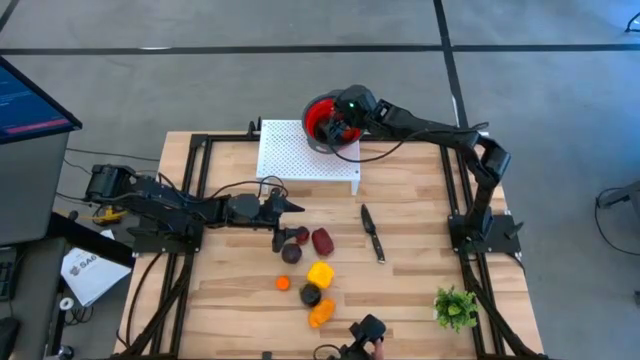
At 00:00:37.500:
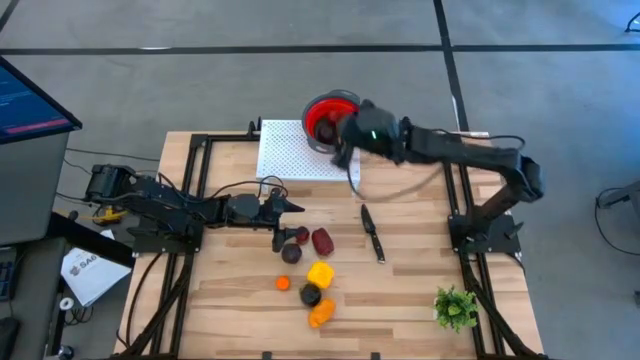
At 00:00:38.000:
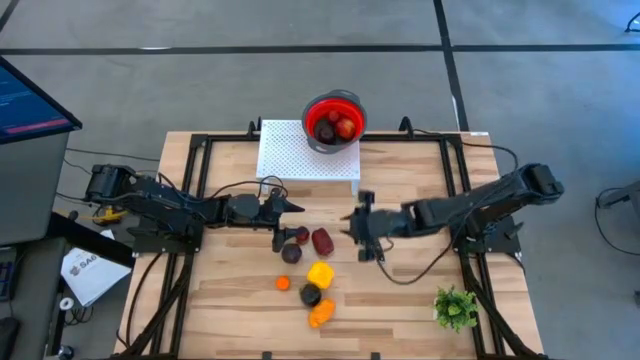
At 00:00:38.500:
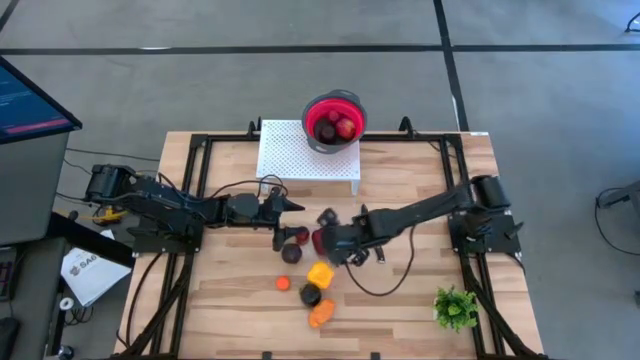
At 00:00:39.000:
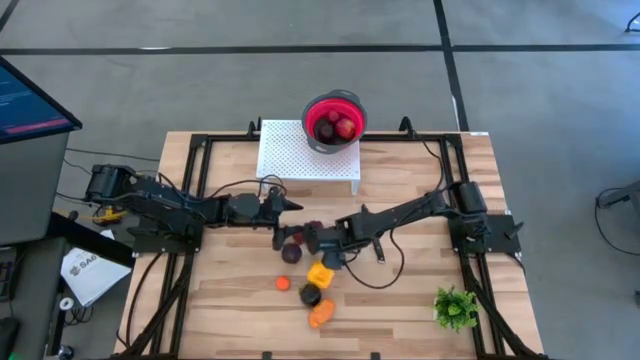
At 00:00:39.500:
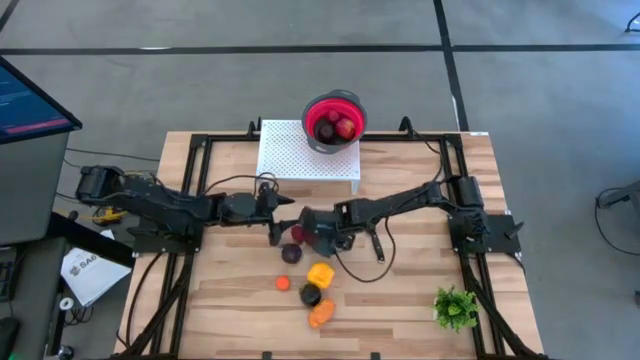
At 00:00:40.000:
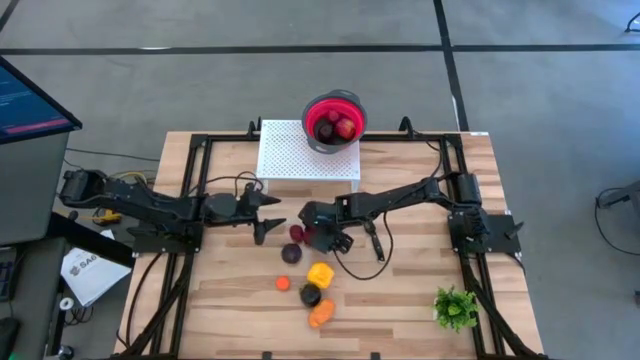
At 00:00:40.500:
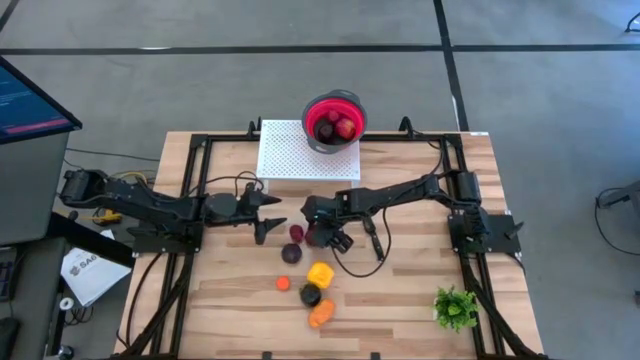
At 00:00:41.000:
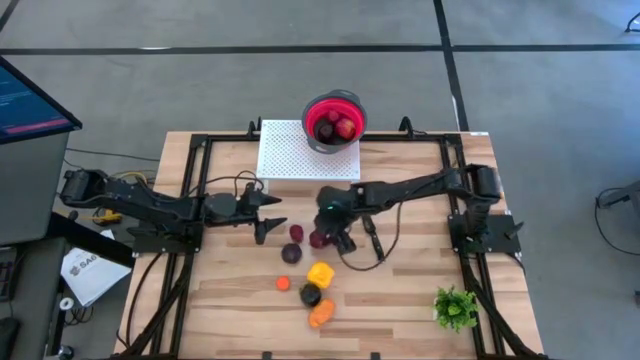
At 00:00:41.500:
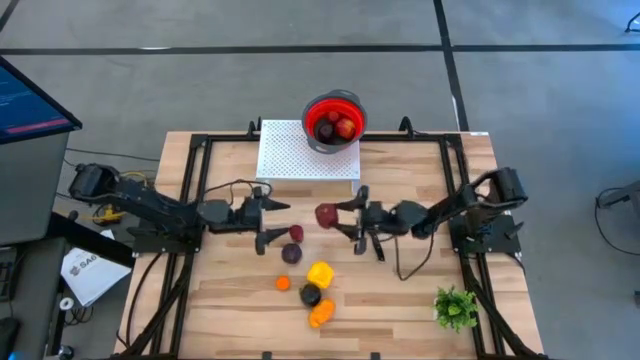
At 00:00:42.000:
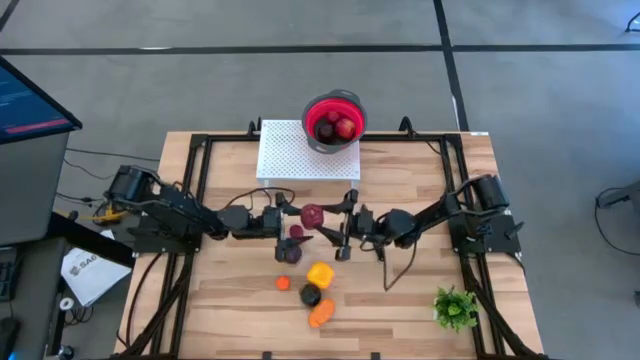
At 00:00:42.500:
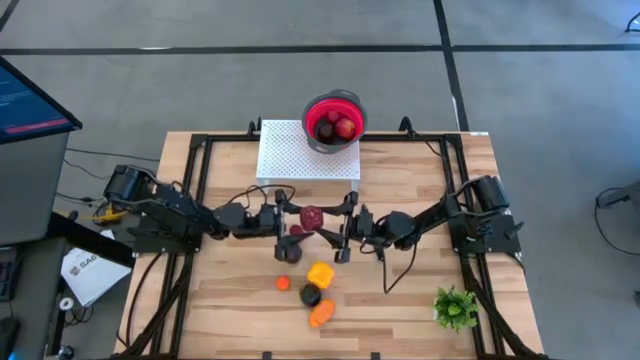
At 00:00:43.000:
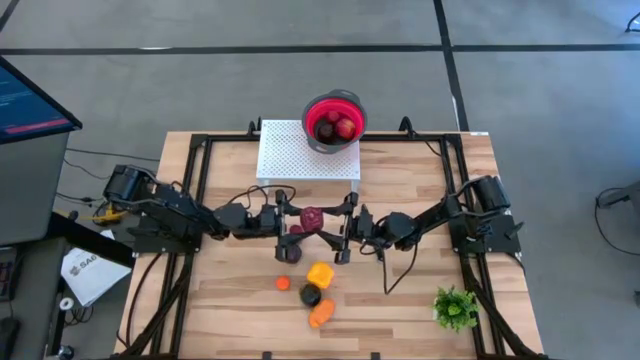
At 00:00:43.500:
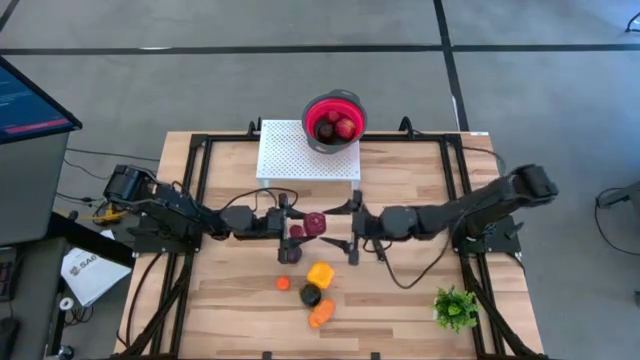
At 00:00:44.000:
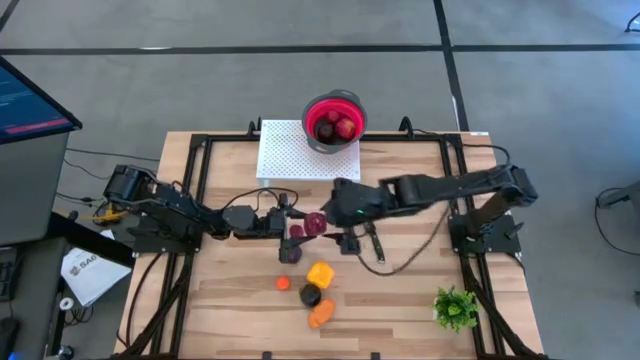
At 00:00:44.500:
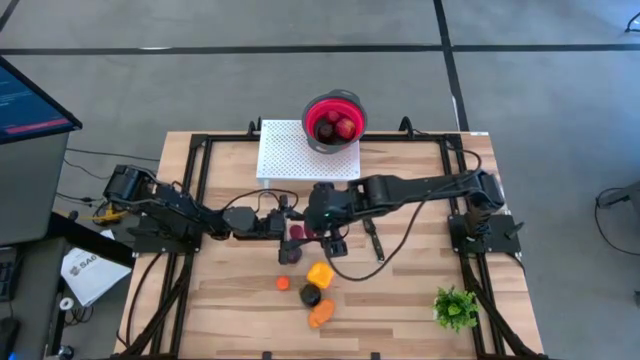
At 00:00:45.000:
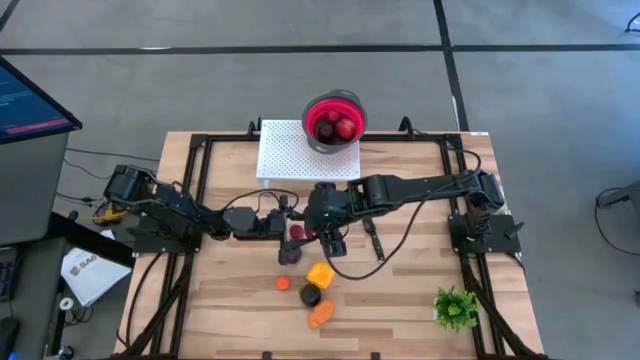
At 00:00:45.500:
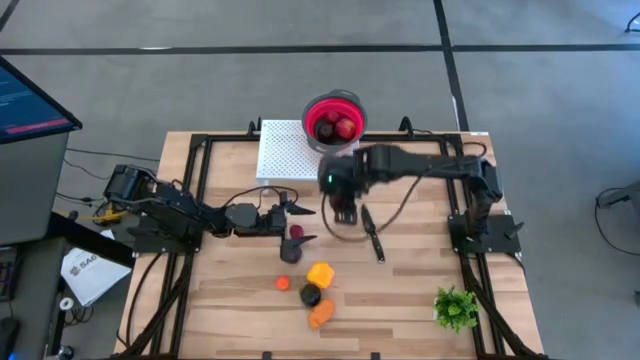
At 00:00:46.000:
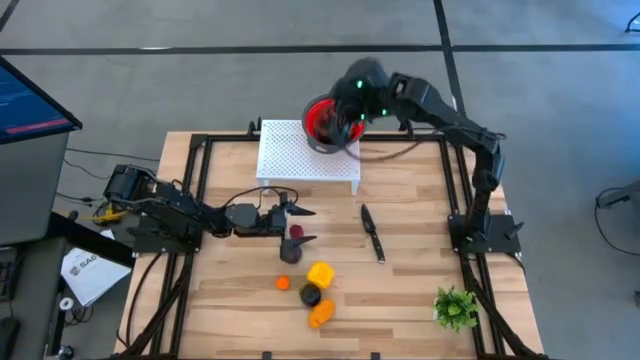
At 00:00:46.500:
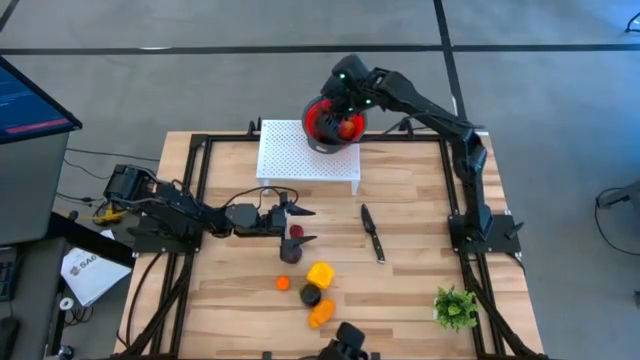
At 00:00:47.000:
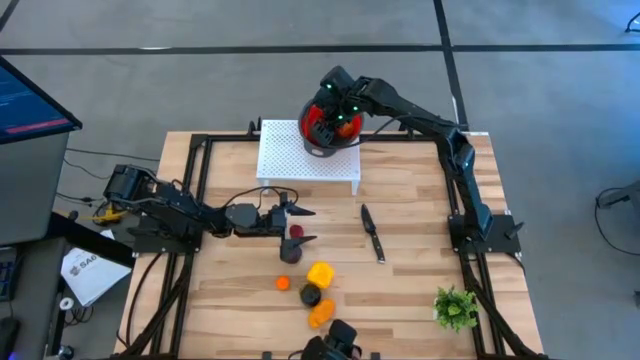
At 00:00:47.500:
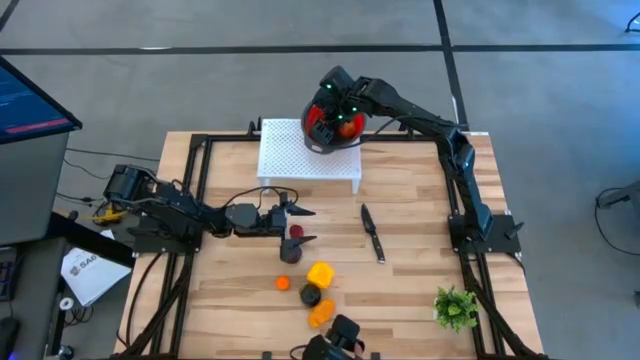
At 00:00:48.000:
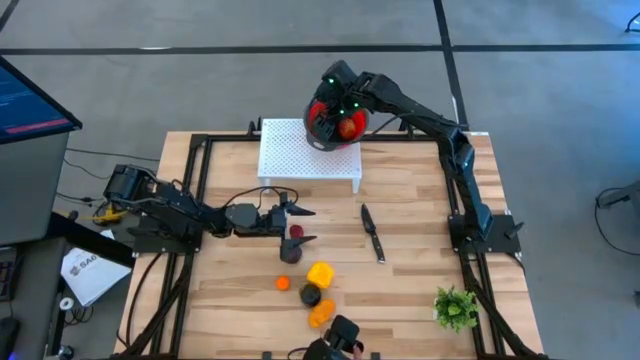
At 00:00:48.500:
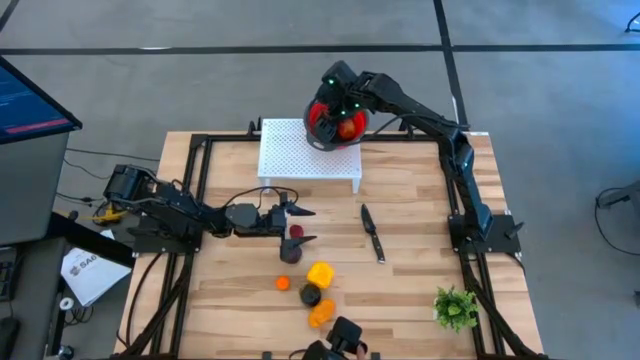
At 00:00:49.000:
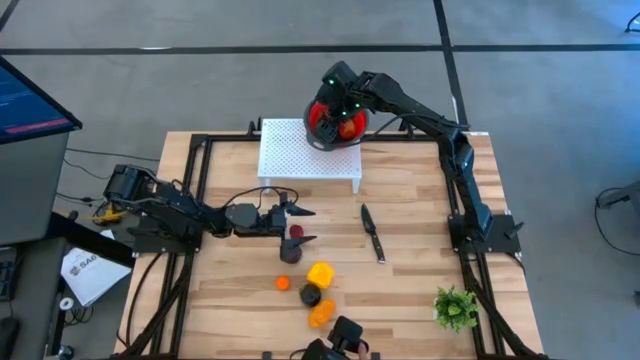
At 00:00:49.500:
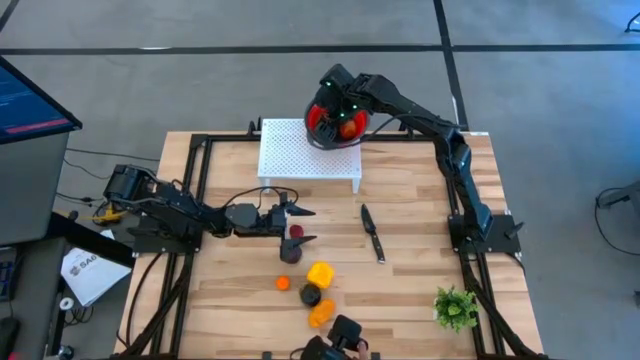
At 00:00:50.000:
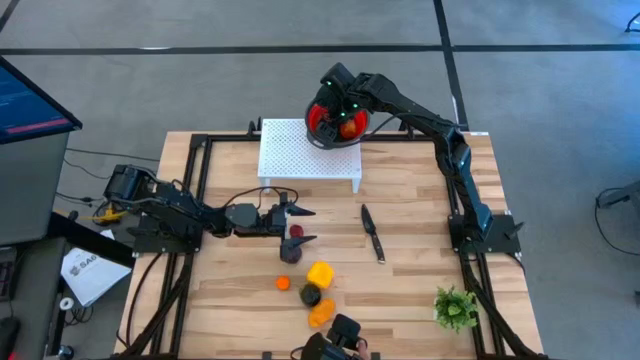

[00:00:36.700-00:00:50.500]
Task: Pick & Place Fruit
Put the red apple into the strainer bowl on the shelf

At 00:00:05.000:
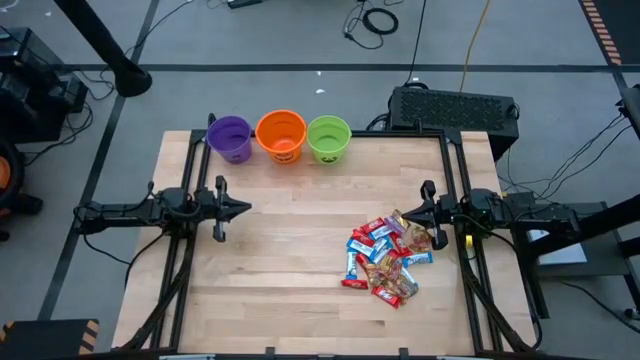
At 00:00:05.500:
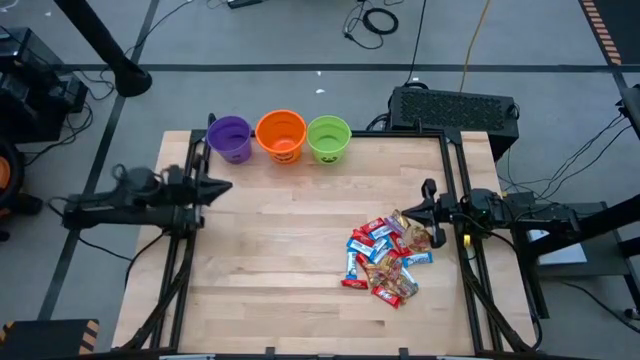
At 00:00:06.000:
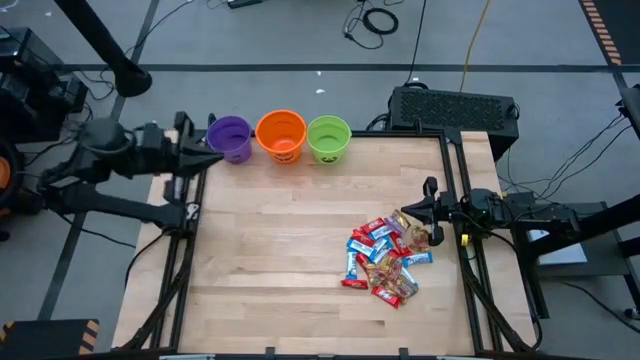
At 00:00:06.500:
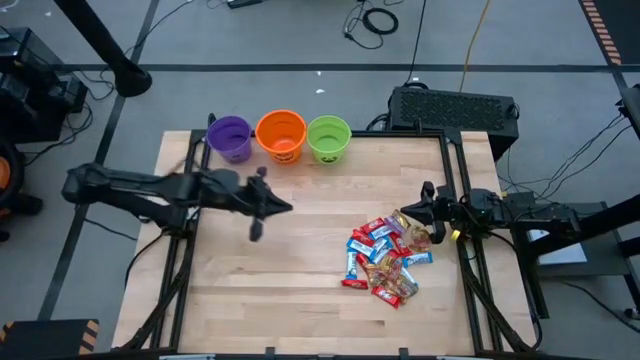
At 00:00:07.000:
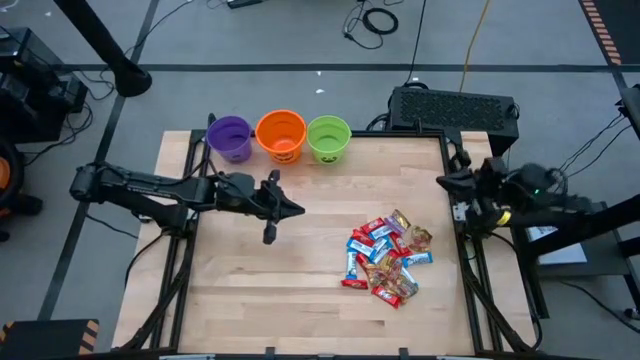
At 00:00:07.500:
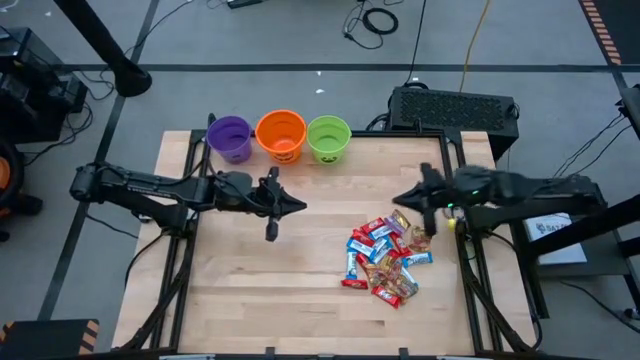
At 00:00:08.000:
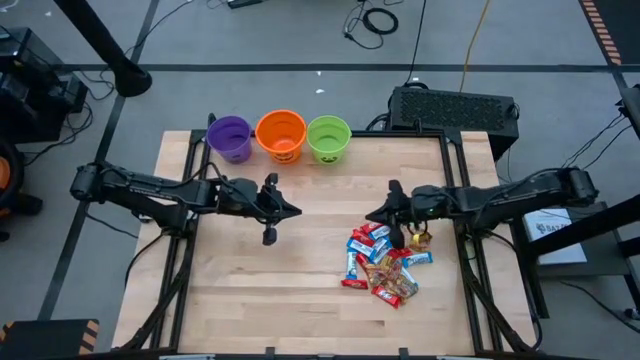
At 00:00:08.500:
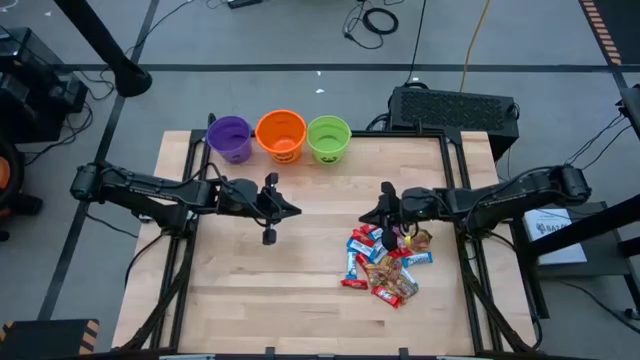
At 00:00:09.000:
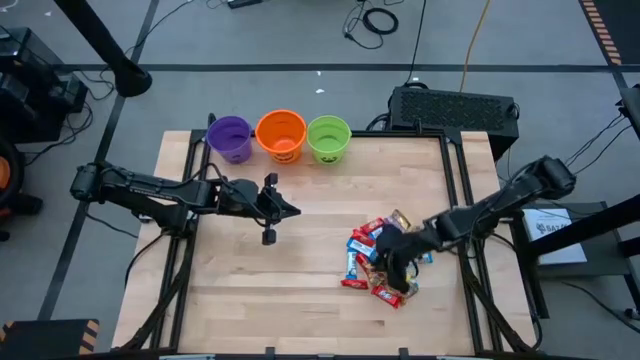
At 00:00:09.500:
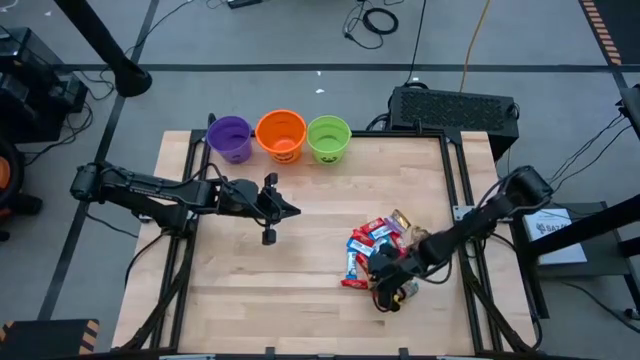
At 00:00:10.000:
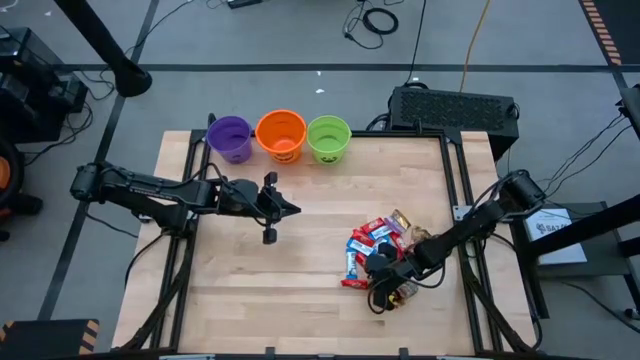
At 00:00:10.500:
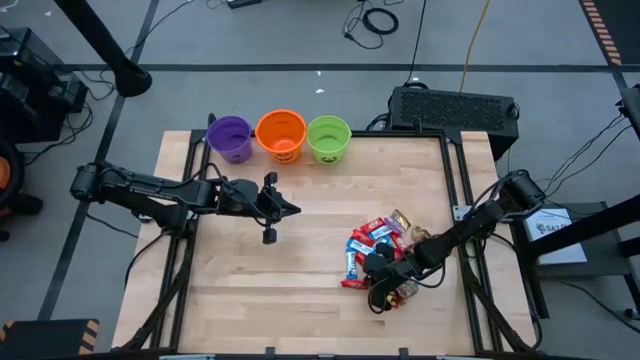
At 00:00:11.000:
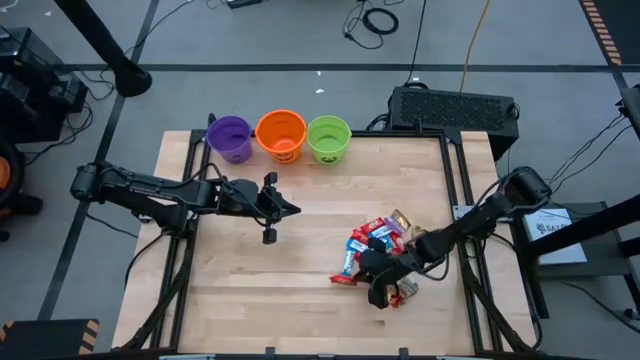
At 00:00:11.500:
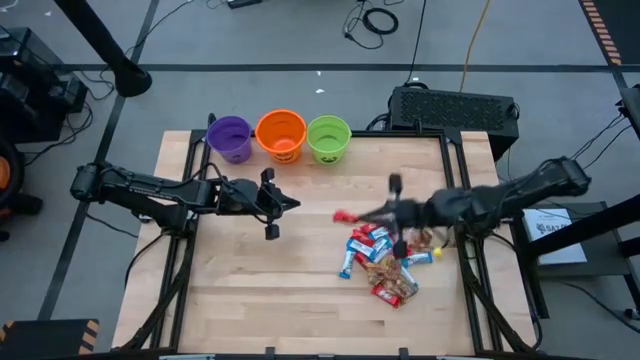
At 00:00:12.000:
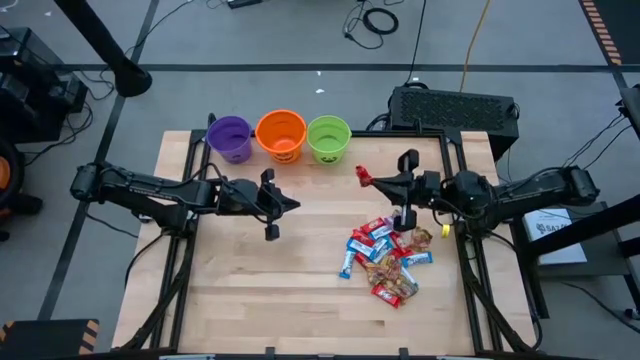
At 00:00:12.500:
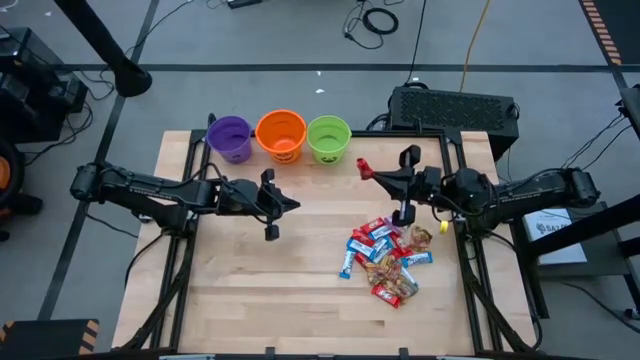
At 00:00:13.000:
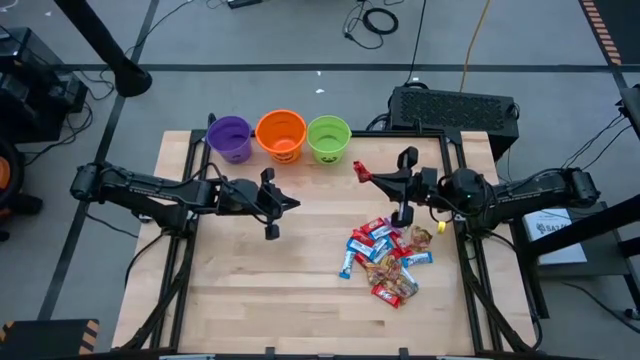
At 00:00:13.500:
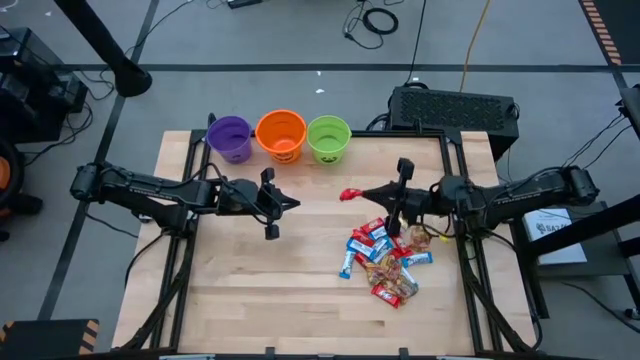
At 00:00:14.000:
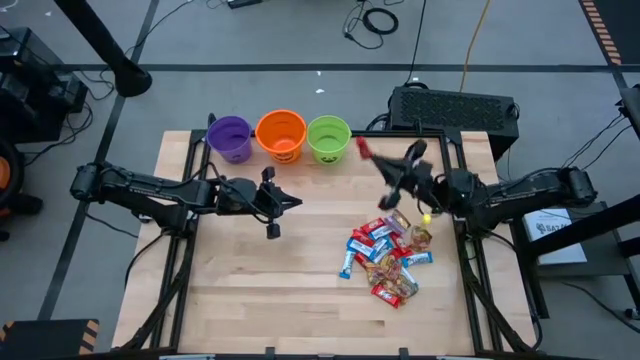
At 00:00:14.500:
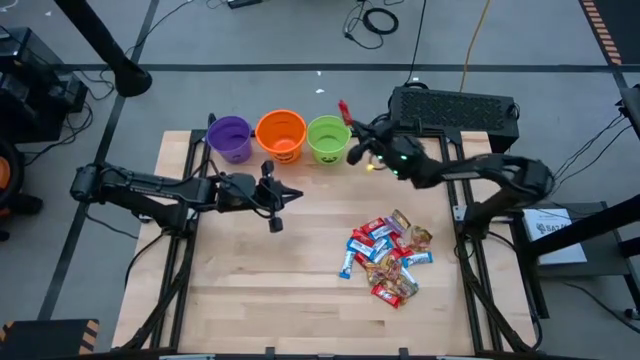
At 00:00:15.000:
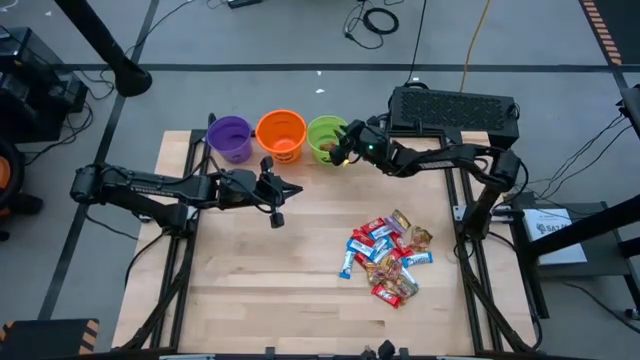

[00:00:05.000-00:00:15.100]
Task: Sort candy by brand, put in halloween buckets
Put the red chocolate bar into the green bucket
